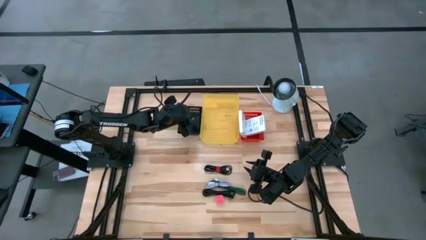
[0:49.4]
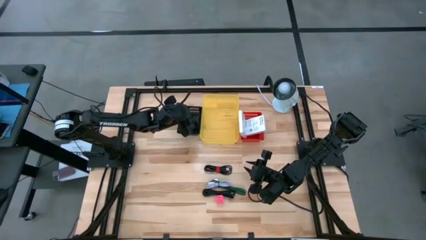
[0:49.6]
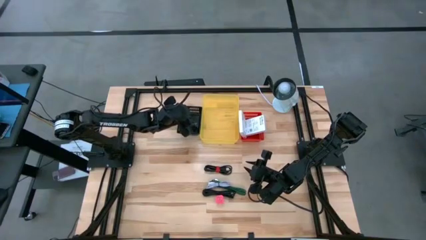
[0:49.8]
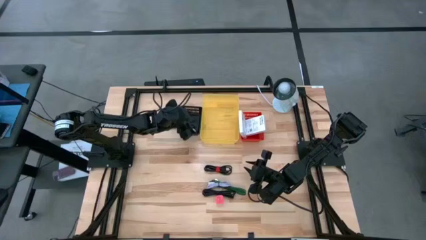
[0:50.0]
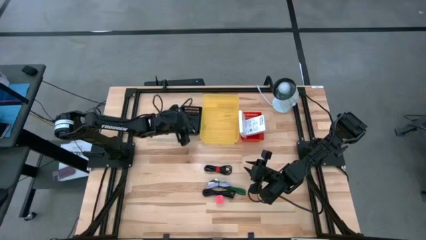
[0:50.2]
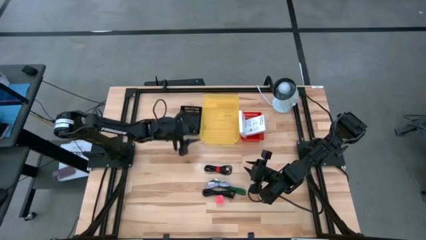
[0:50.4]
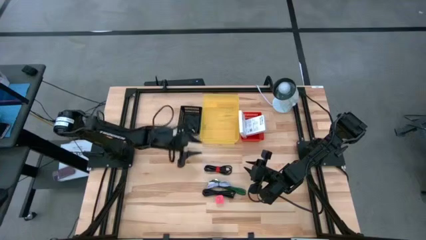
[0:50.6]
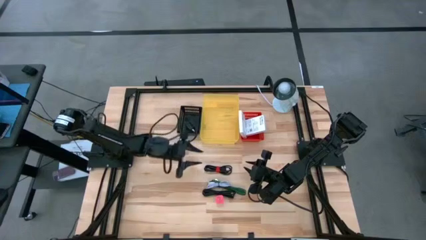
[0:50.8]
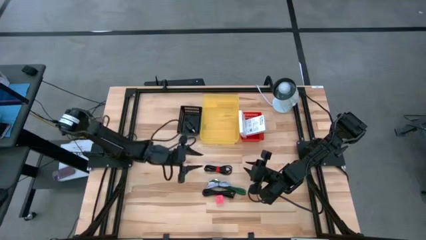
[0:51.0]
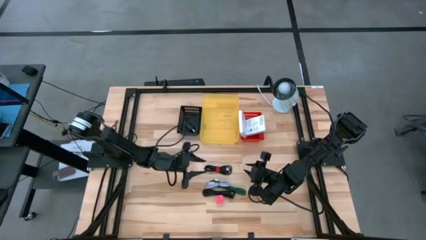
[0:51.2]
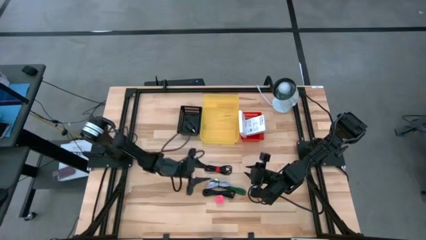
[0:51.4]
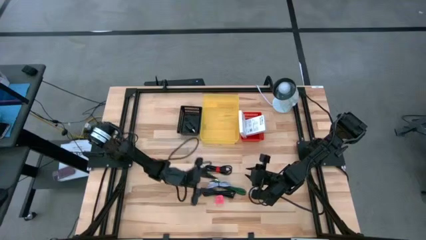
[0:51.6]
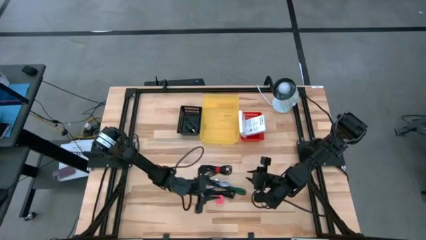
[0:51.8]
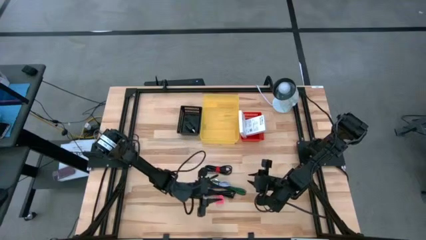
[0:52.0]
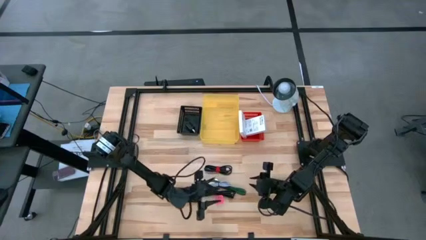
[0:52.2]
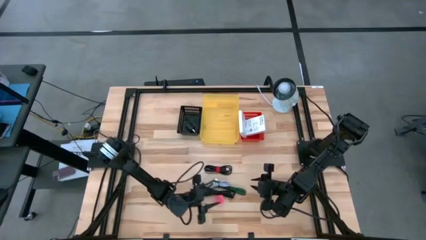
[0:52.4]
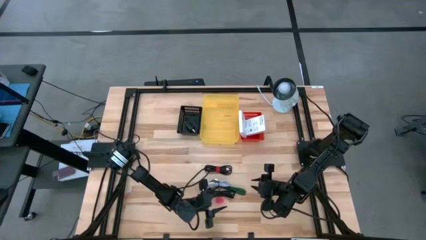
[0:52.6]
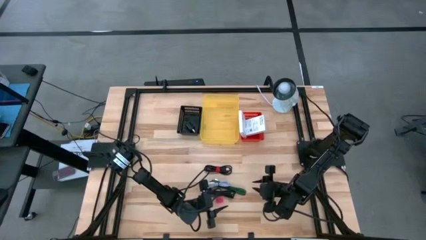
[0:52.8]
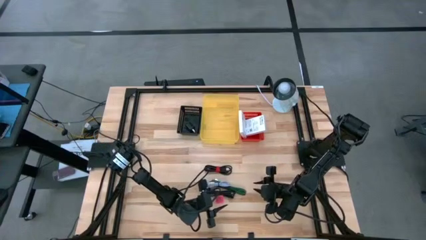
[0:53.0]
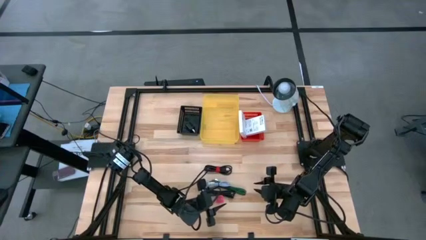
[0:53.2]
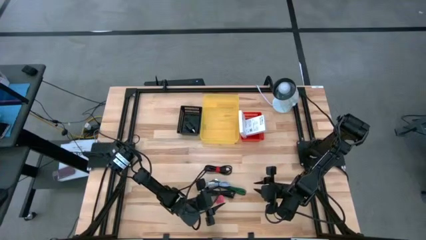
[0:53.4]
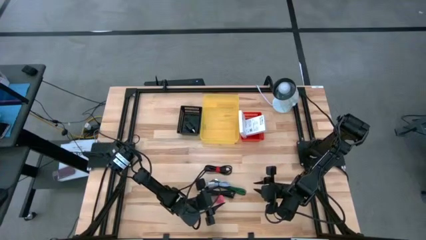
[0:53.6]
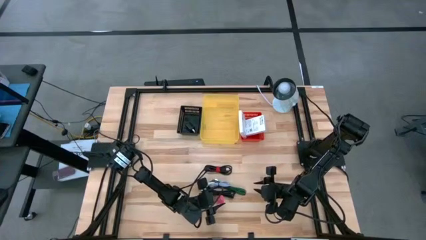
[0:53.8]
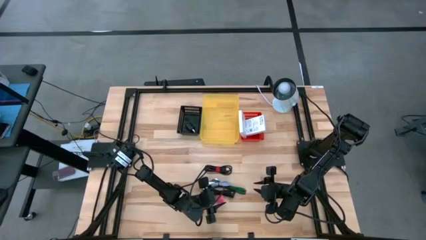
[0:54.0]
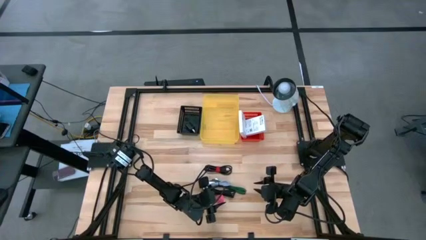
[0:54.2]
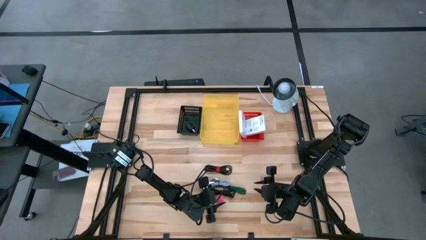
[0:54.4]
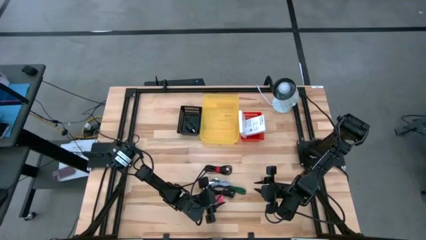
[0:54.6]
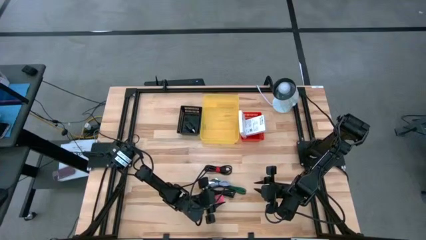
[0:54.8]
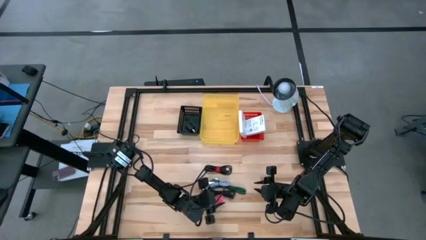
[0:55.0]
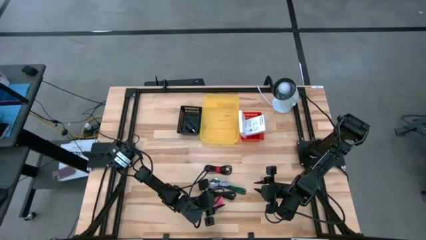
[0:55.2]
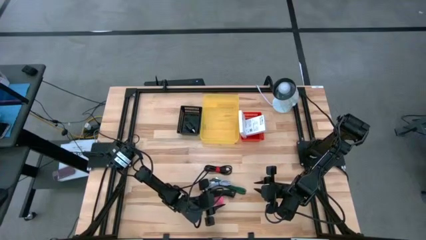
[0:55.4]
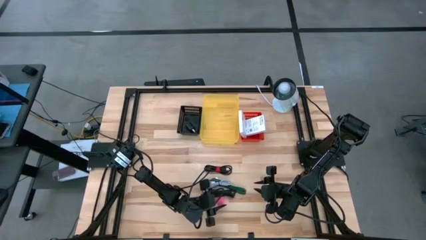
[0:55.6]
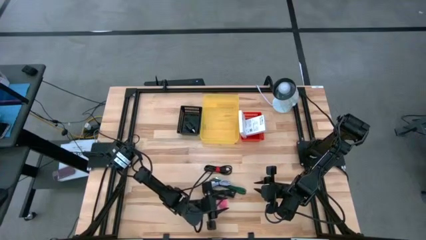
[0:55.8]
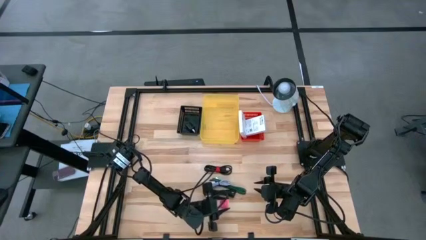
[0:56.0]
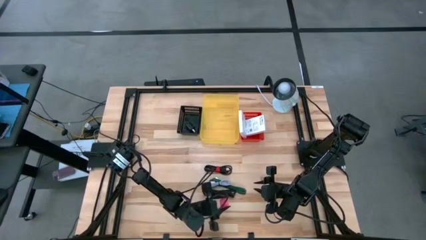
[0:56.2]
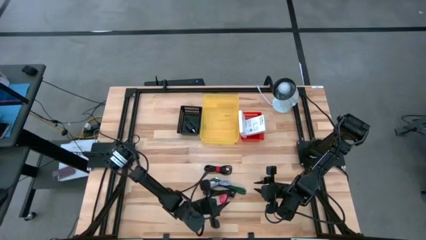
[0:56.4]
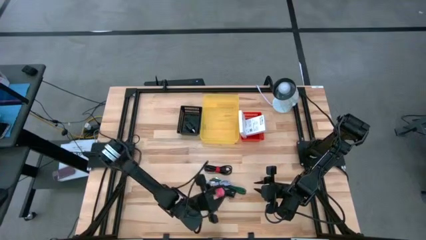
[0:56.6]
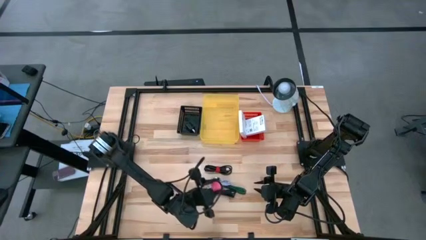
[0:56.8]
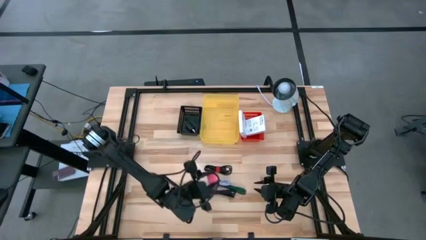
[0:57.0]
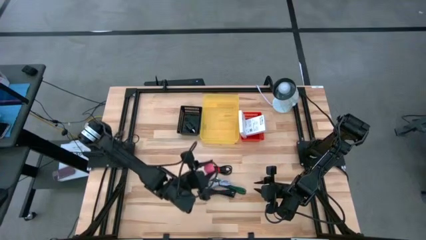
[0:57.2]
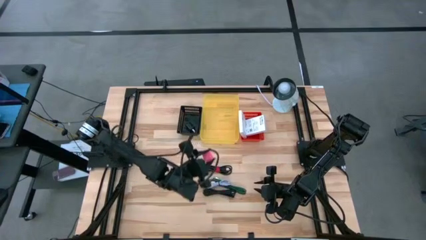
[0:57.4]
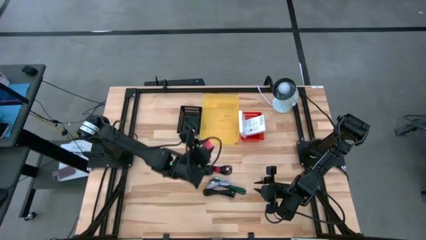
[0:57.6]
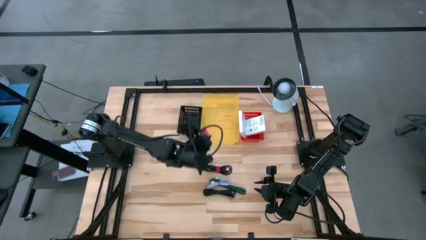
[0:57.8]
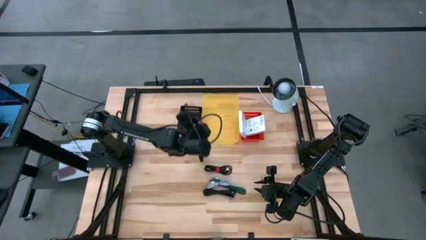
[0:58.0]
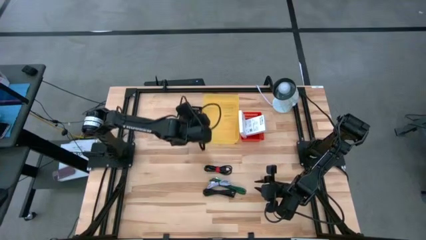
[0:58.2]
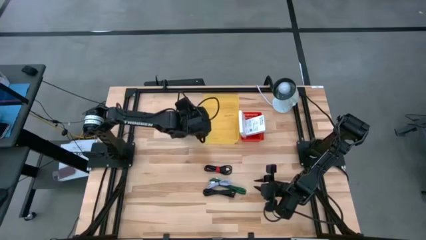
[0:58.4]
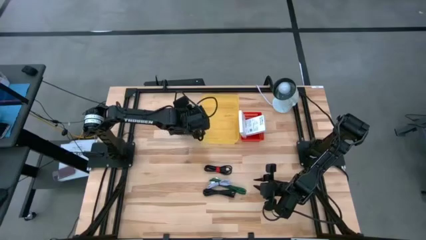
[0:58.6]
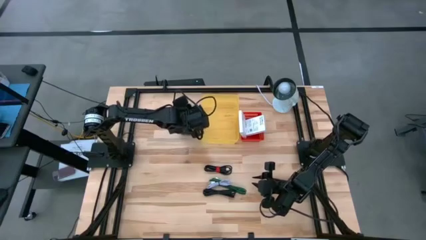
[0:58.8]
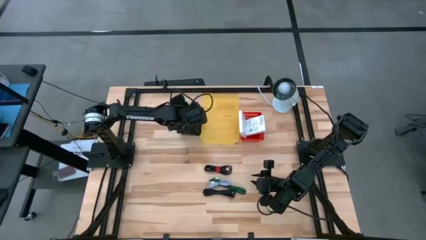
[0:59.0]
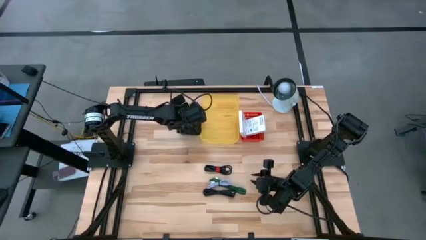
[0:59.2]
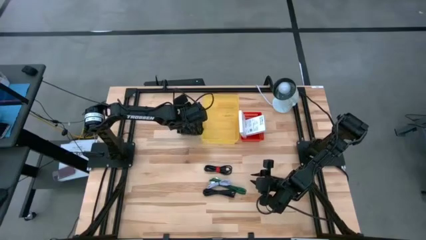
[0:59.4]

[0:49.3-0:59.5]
Task: Pick and place items into bin
Put the pink charger adapter into the black bin

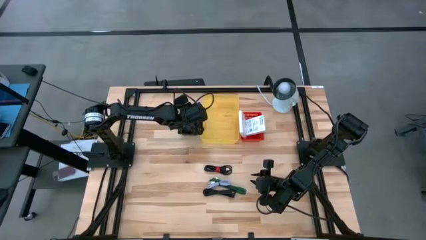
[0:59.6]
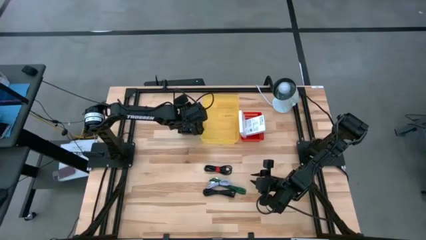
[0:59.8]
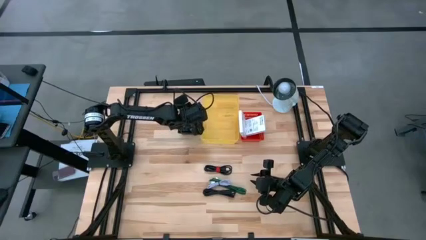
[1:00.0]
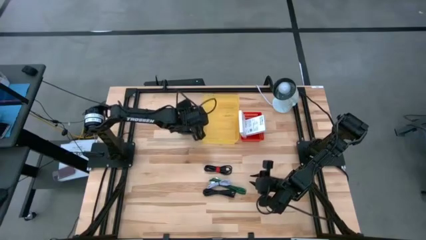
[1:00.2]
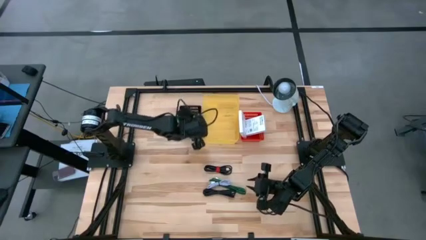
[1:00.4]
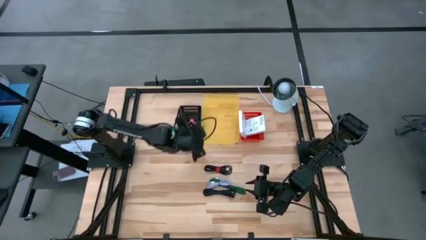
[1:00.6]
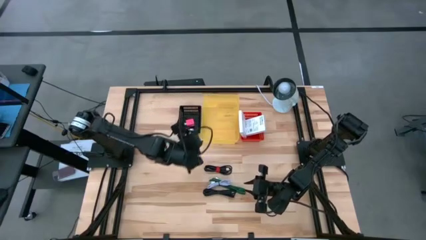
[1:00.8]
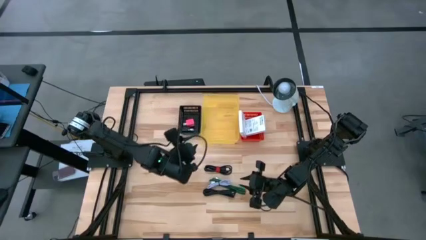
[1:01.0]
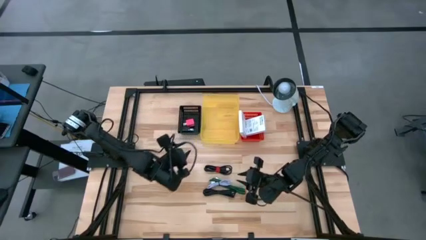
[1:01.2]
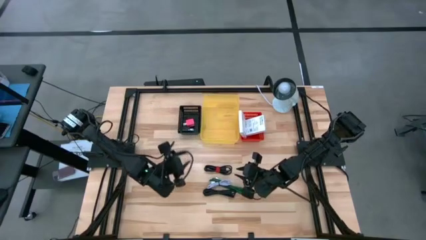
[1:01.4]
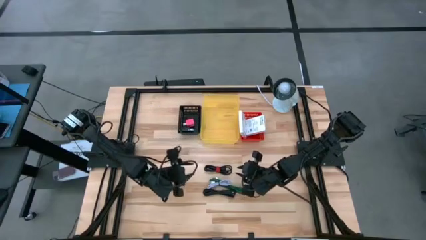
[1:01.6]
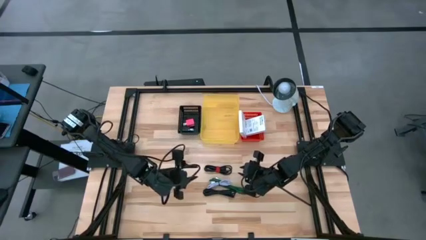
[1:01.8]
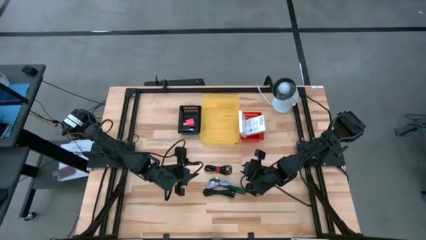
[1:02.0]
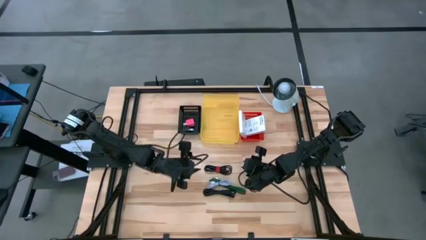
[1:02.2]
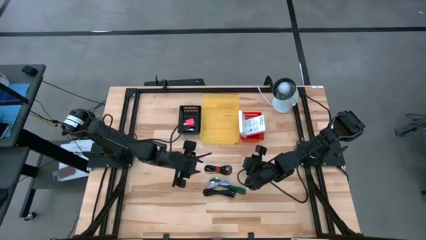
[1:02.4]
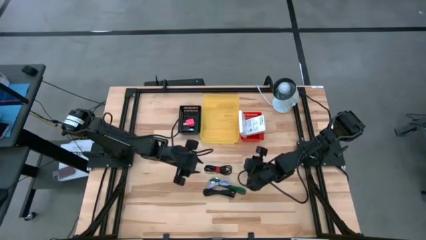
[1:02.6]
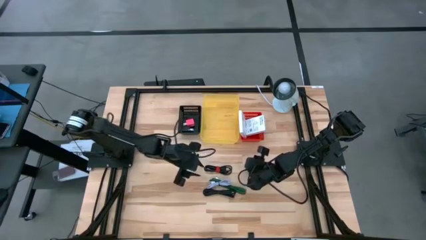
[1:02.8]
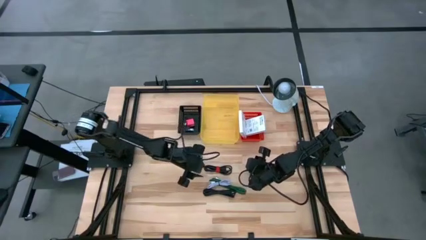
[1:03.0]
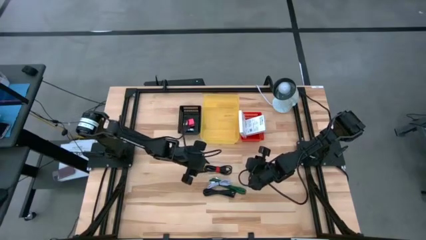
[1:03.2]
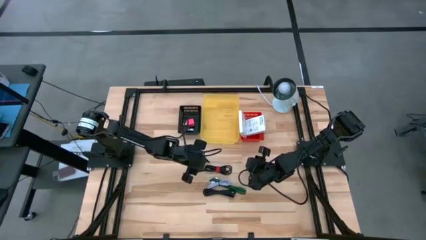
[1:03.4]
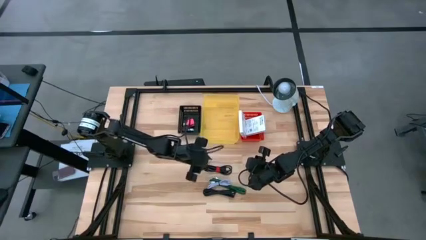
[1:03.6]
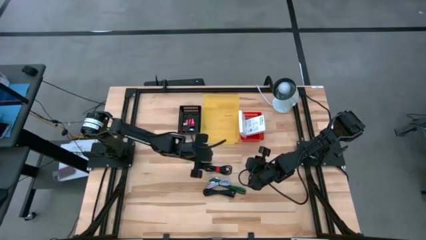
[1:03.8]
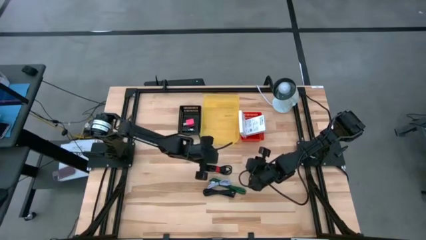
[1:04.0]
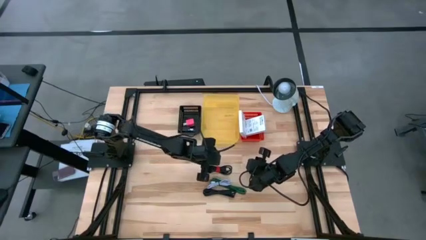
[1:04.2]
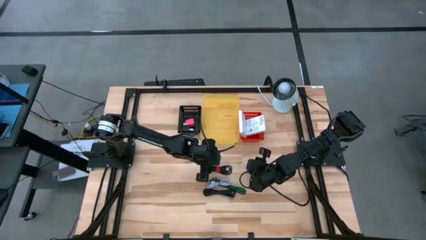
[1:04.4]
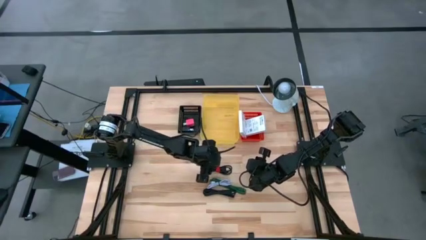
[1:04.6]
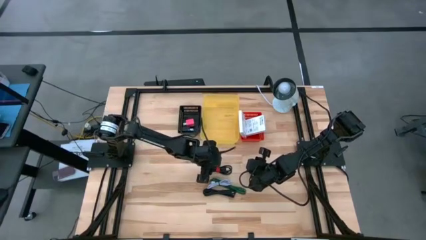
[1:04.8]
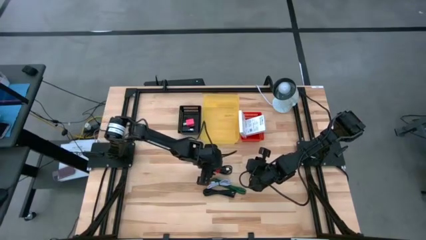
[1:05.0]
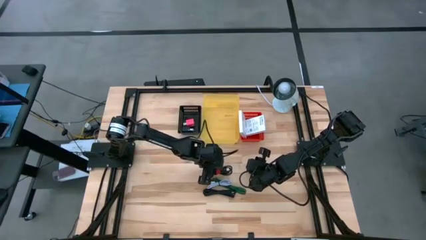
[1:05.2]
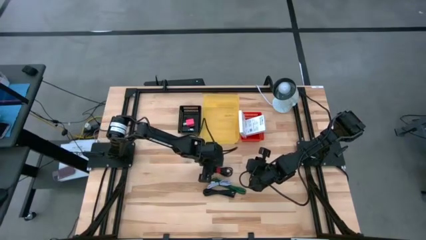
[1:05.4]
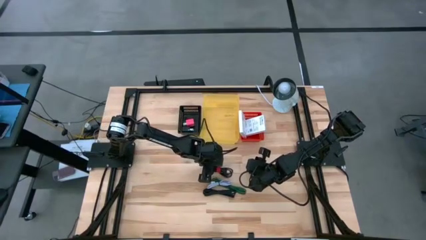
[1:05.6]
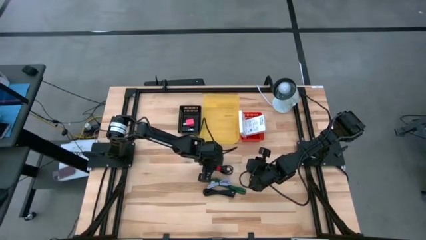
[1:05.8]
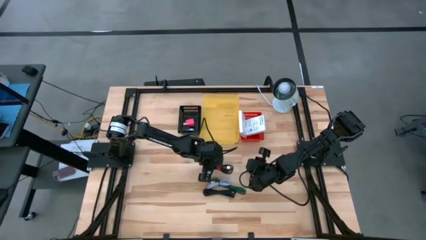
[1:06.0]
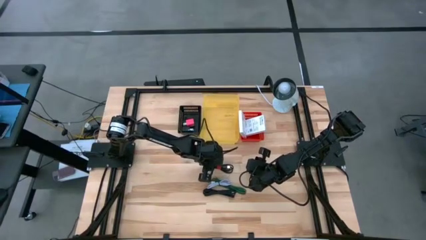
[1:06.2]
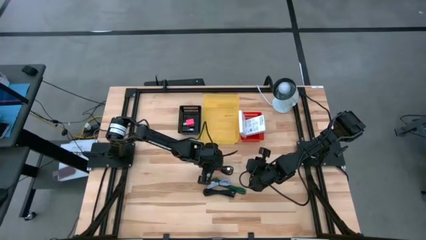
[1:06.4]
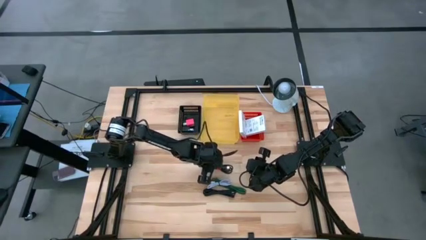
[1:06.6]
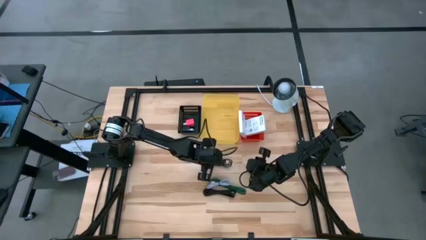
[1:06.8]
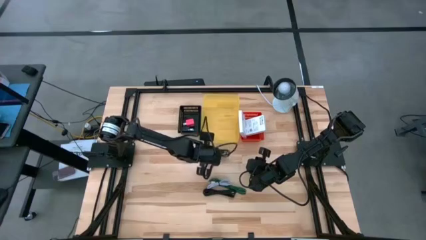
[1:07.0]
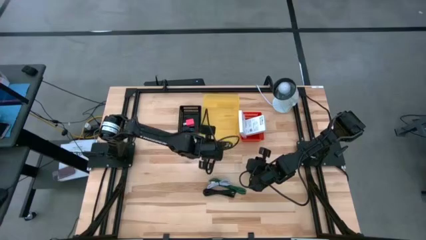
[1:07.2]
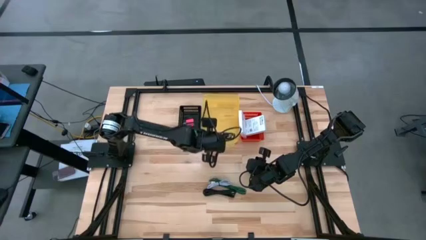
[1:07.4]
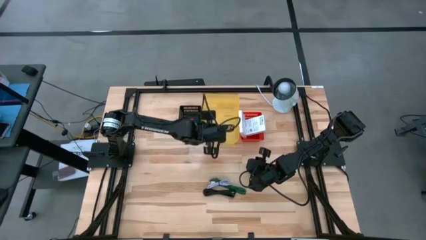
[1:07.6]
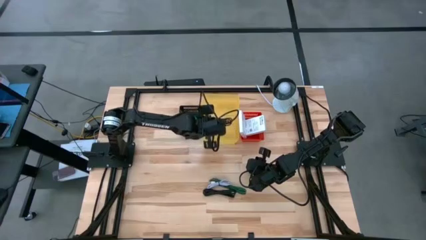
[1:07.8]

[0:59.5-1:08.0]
Put the top black USB cable into the yellow bin
